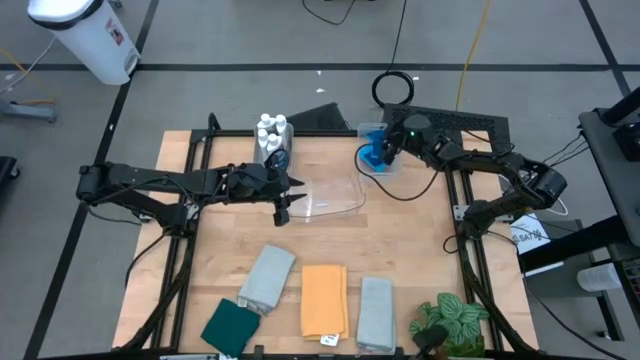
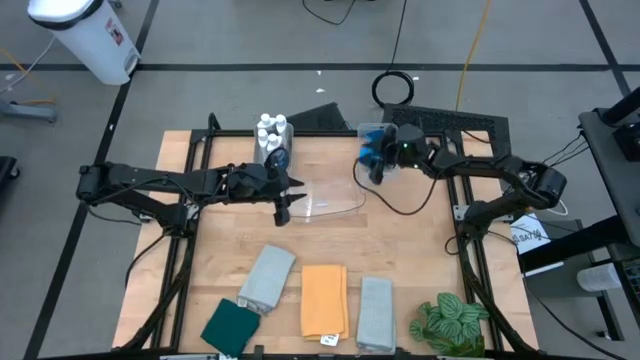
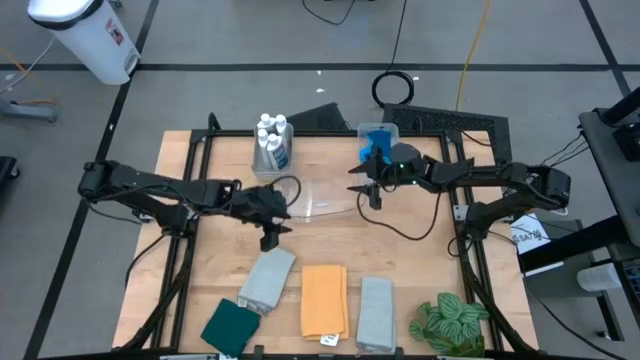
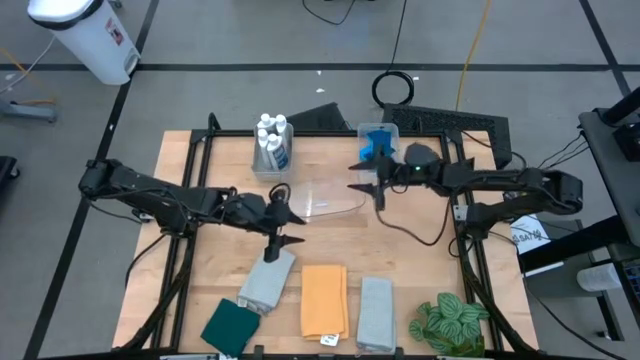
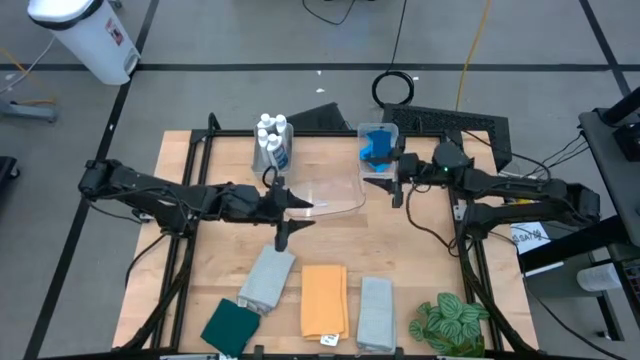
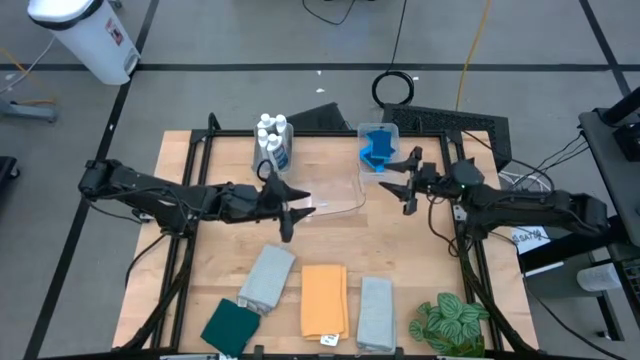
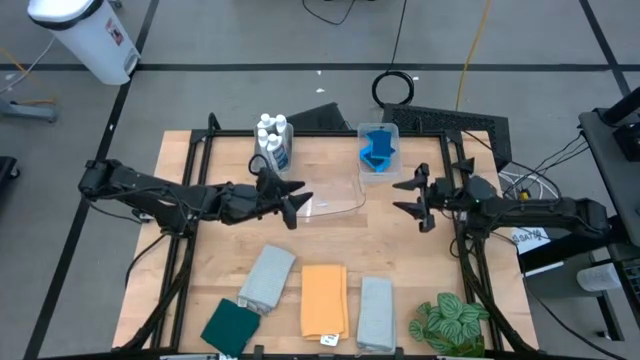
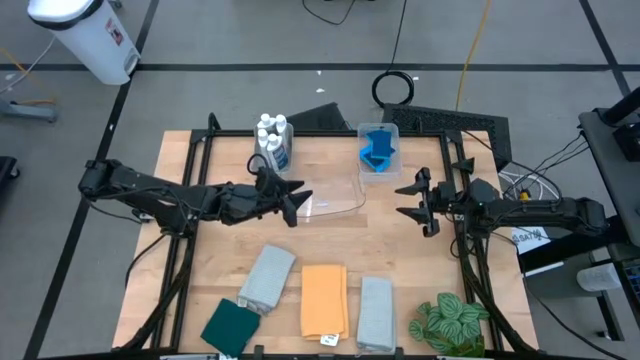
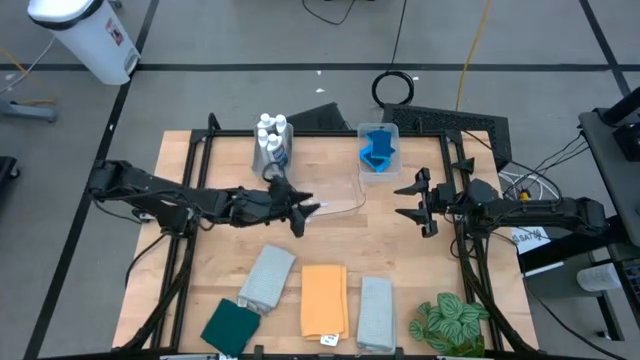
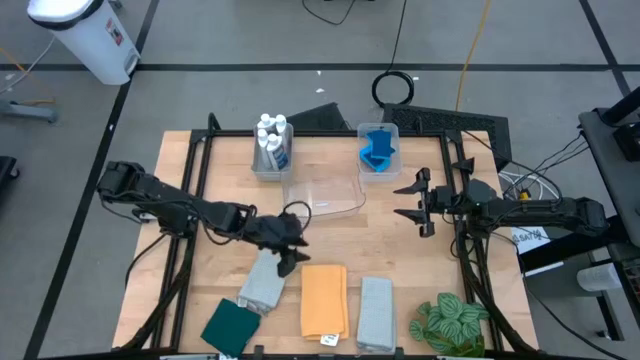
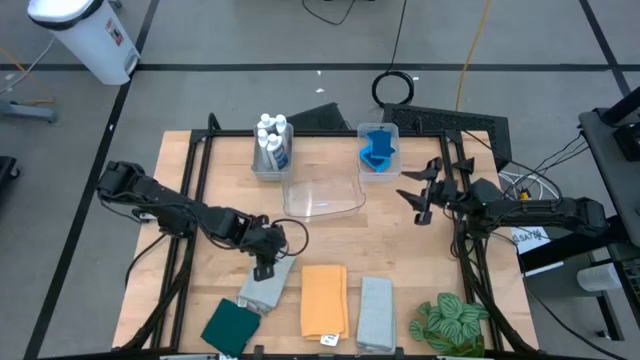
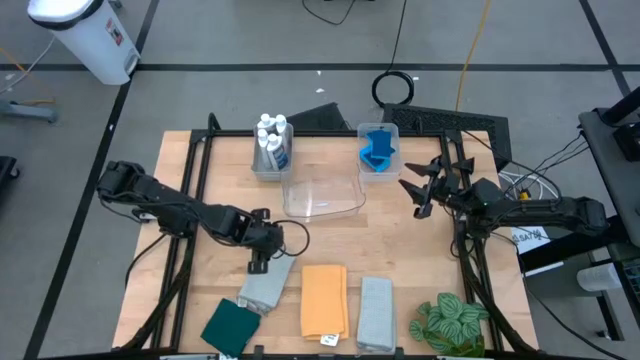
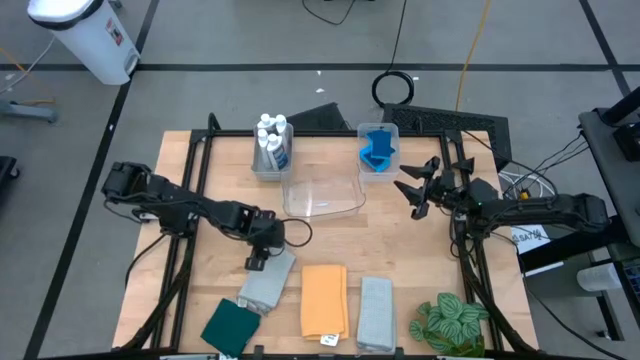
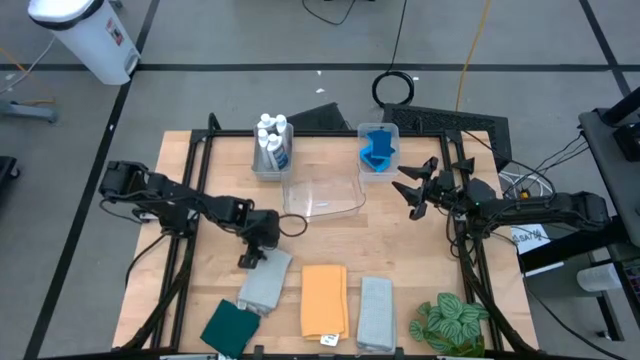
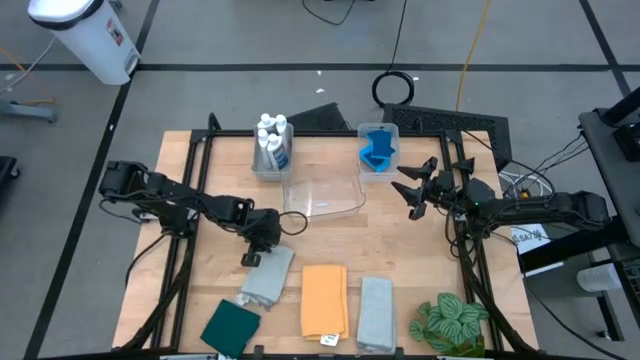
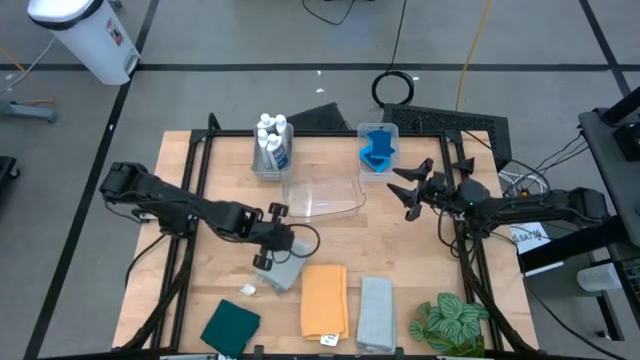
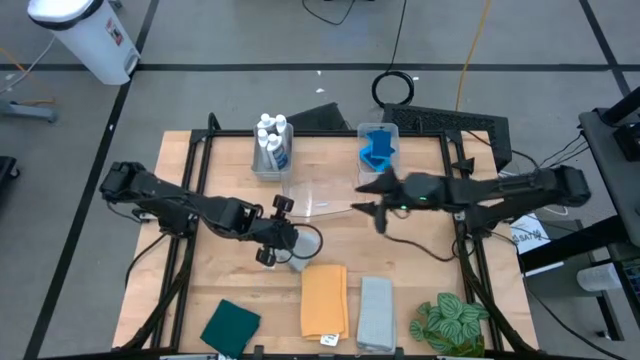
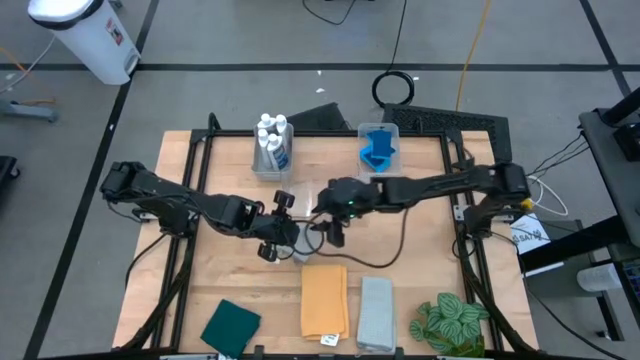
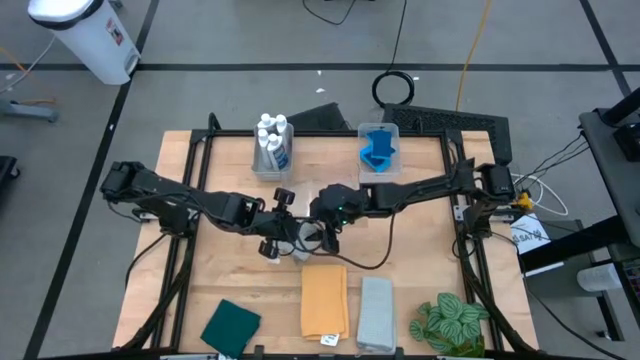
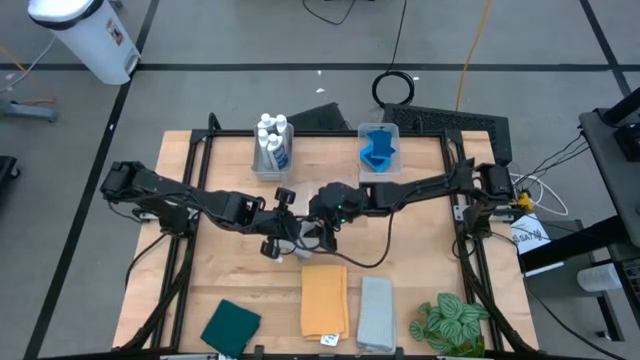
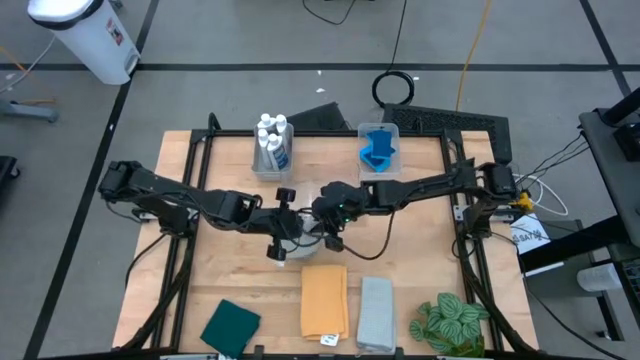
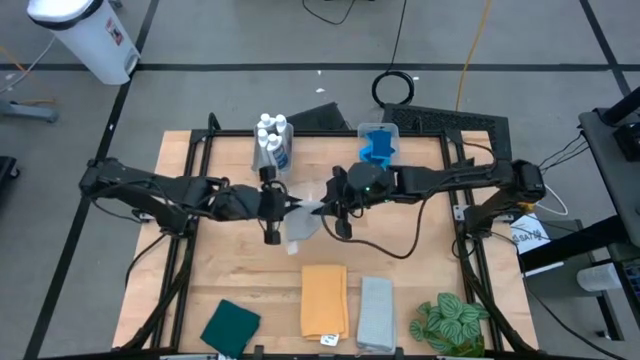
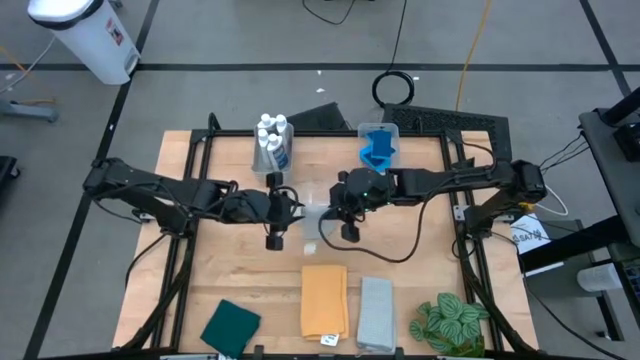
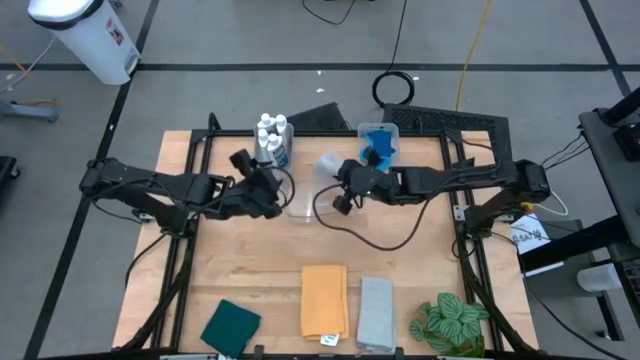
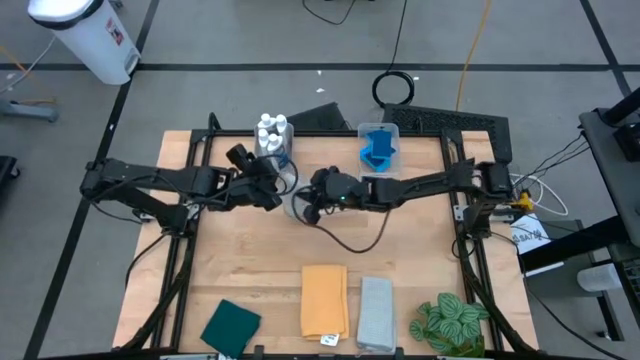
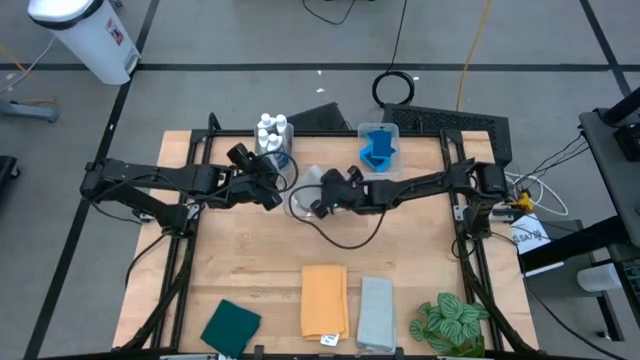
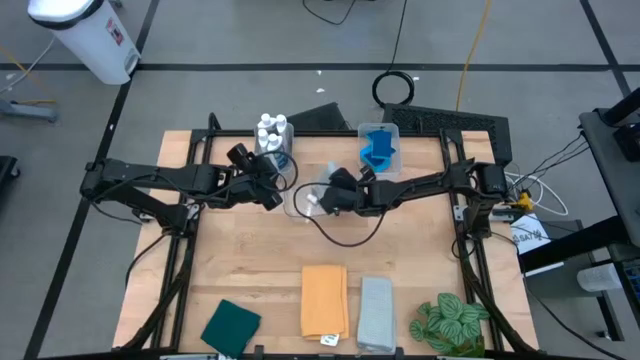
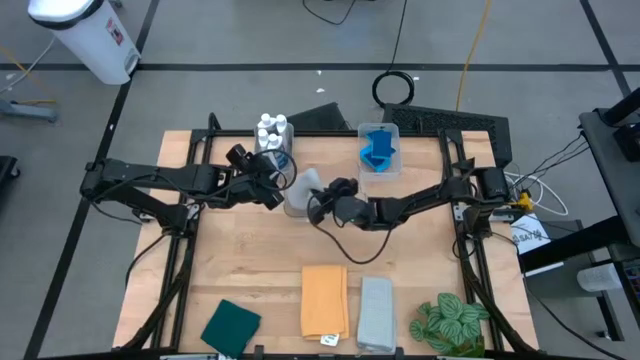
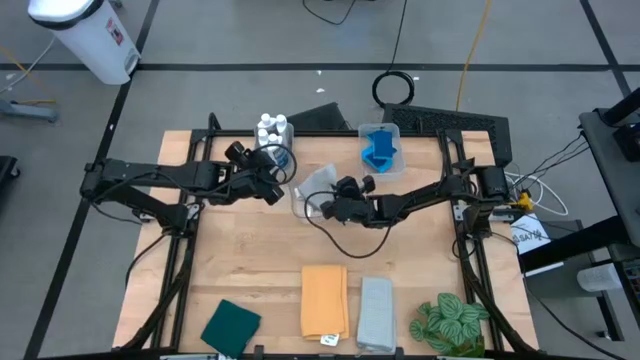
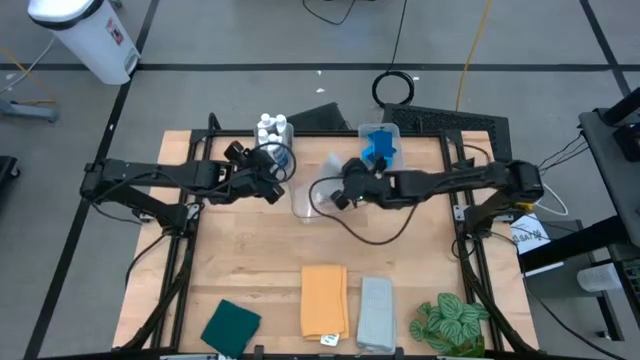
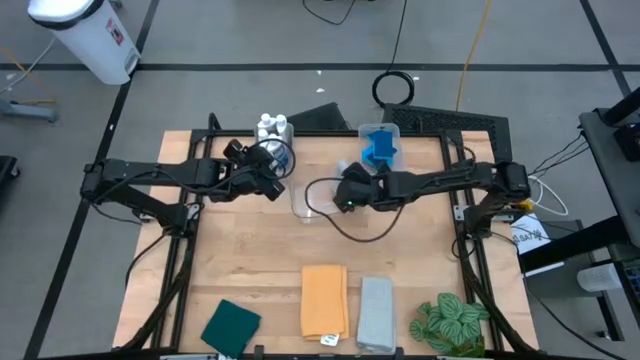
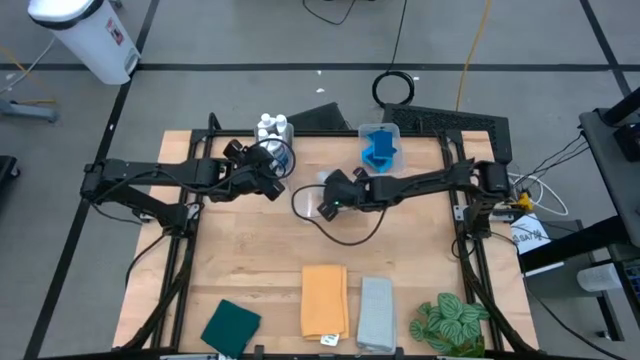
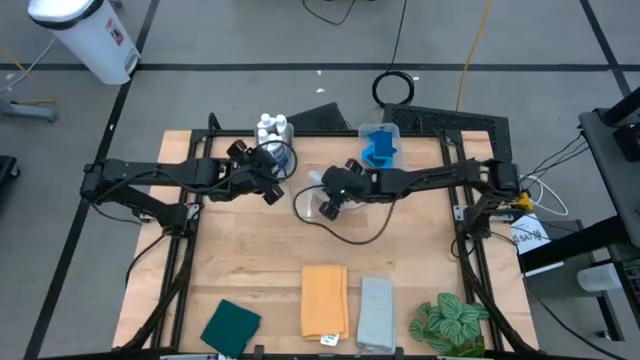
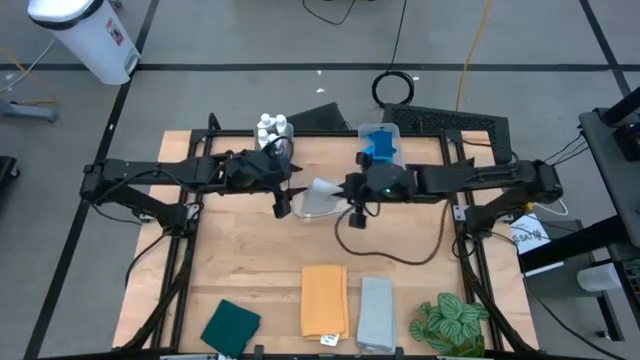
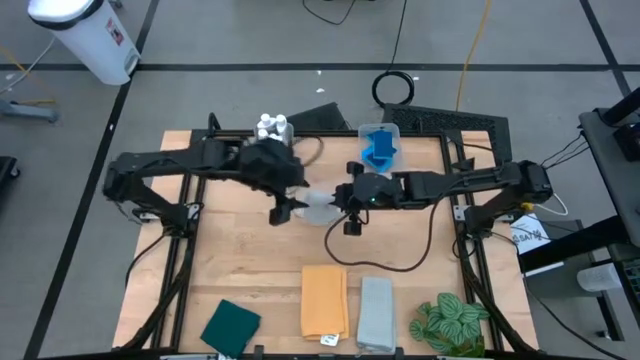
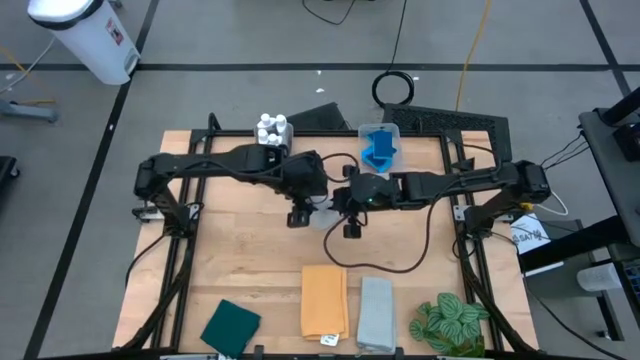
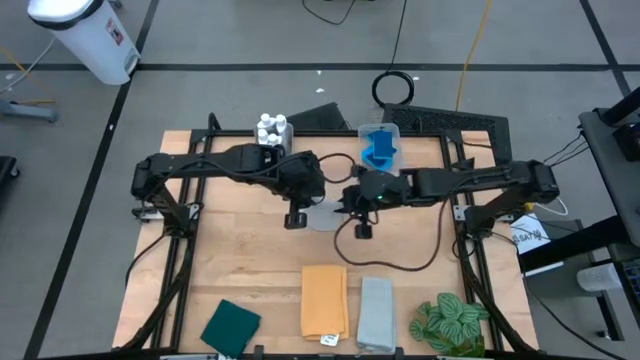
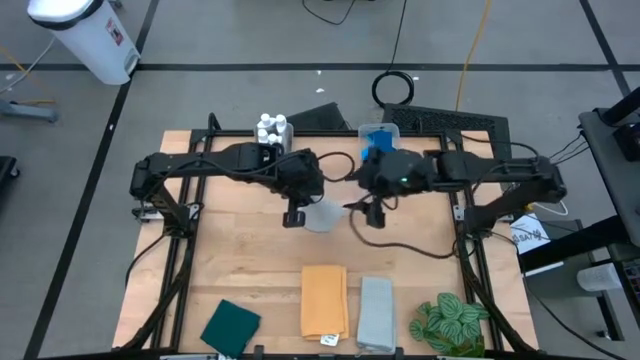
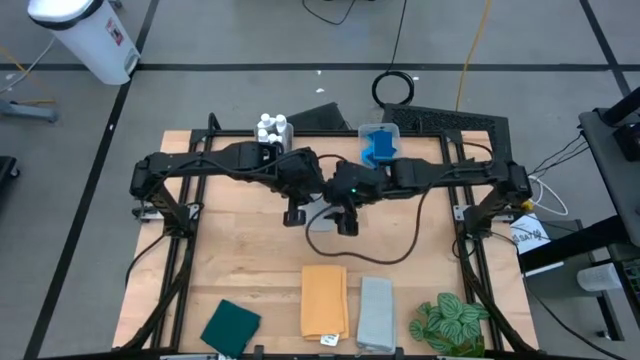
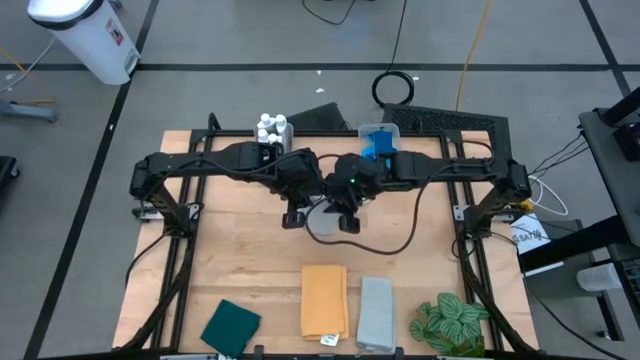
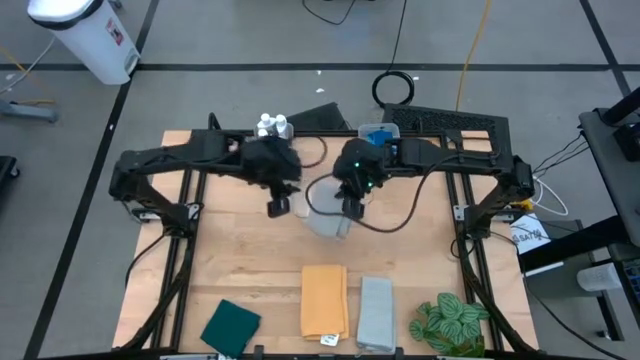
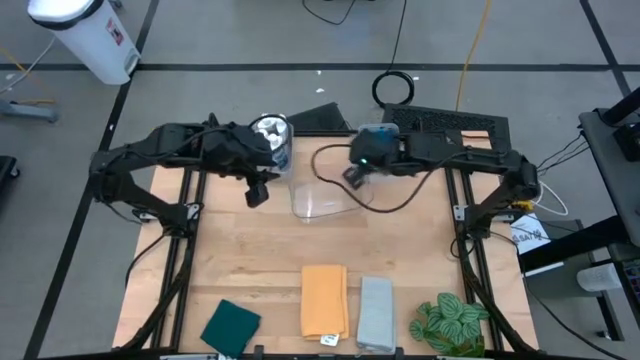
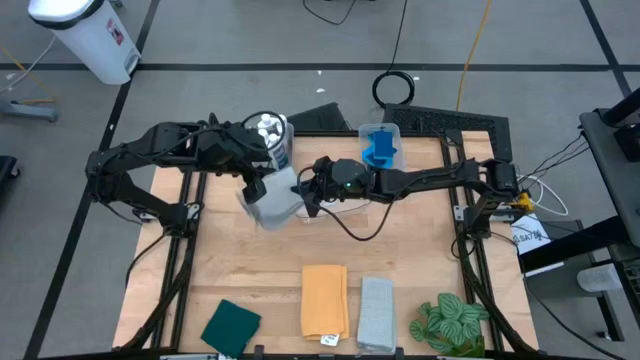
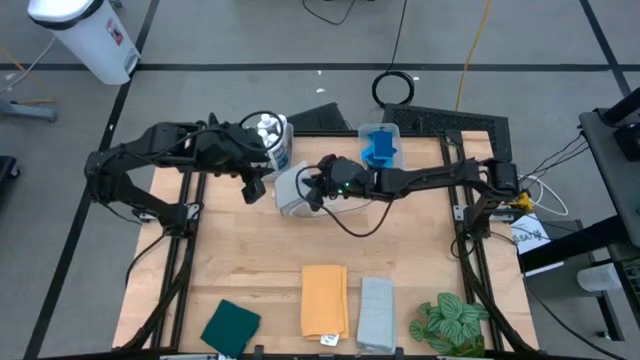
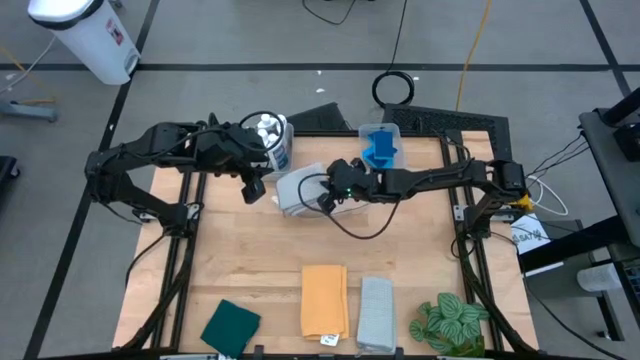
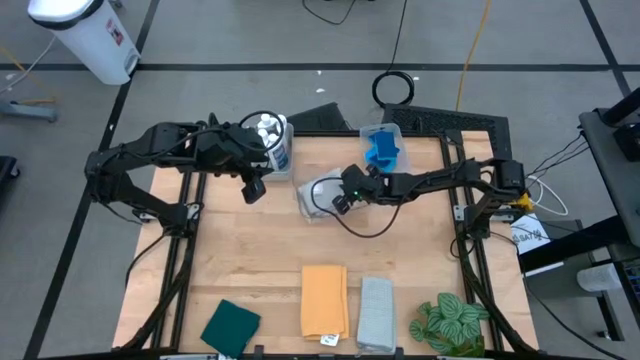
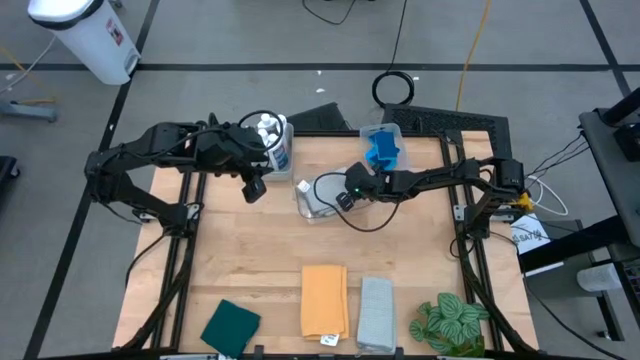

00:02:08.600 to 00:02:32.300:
Task: Pick & Place Kitchen Items
Put the gray towel into the transparent bin
